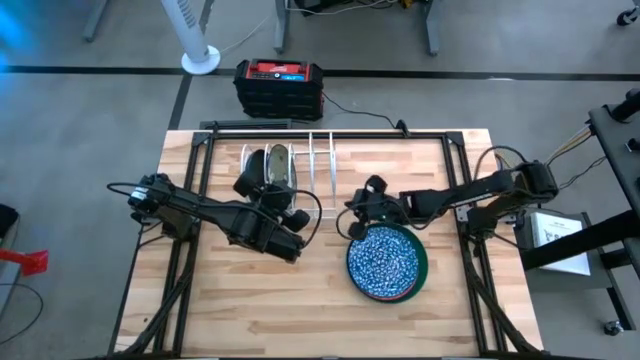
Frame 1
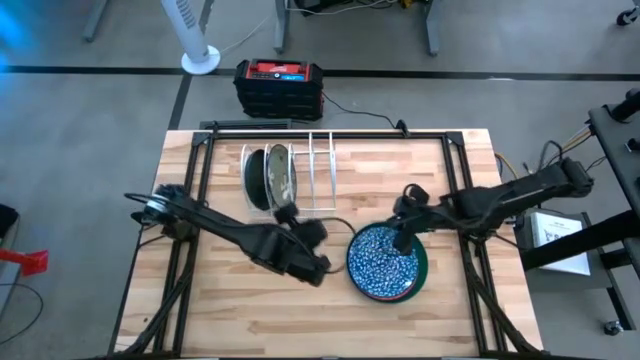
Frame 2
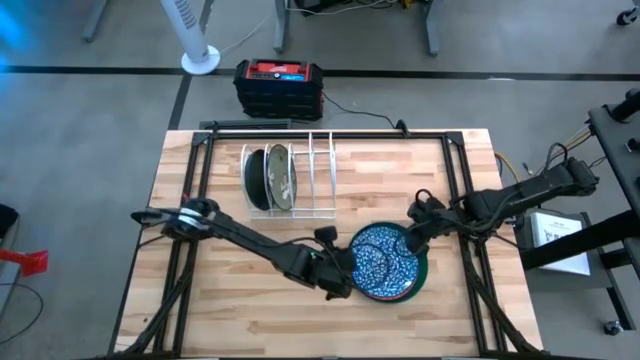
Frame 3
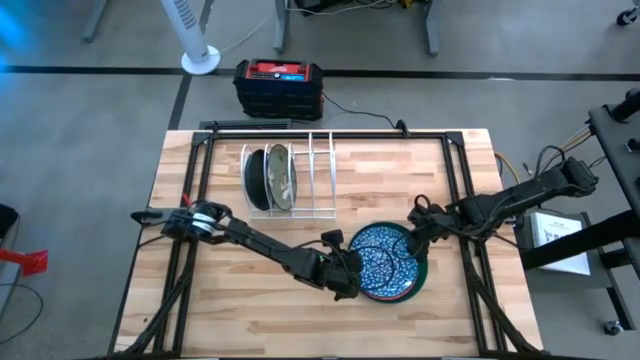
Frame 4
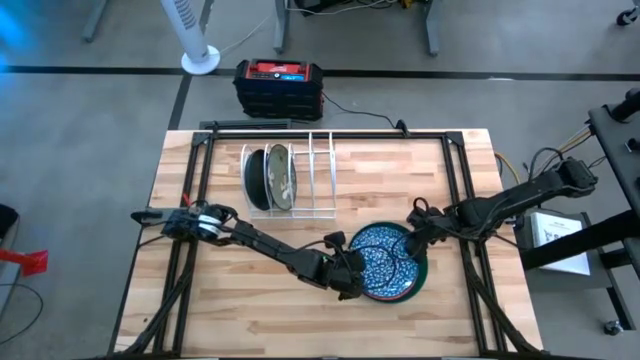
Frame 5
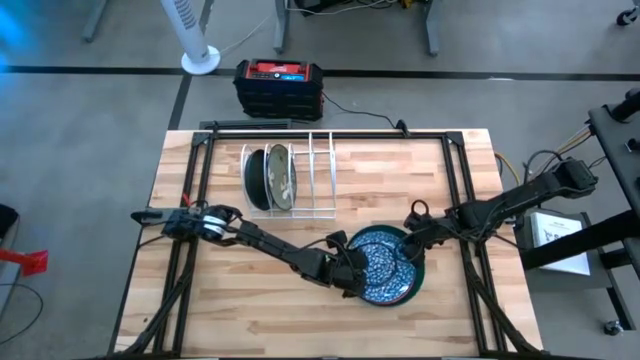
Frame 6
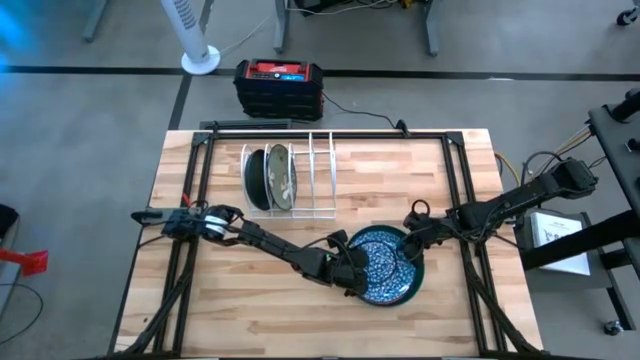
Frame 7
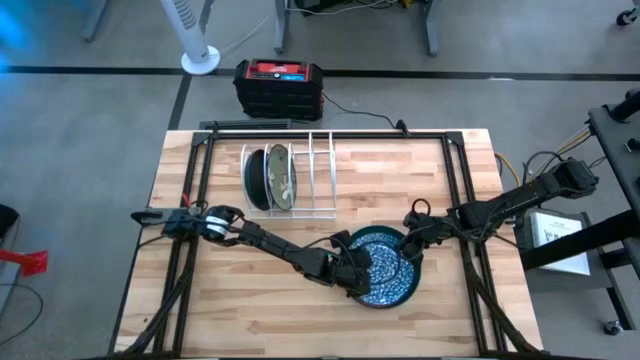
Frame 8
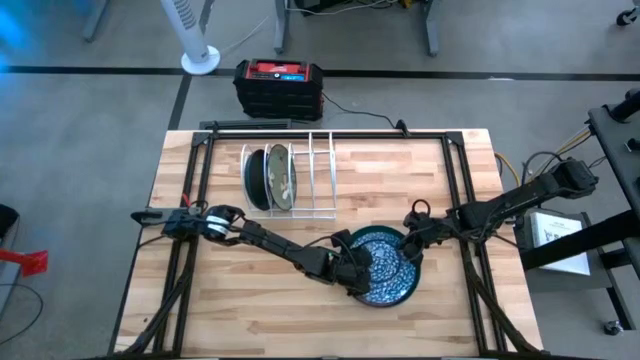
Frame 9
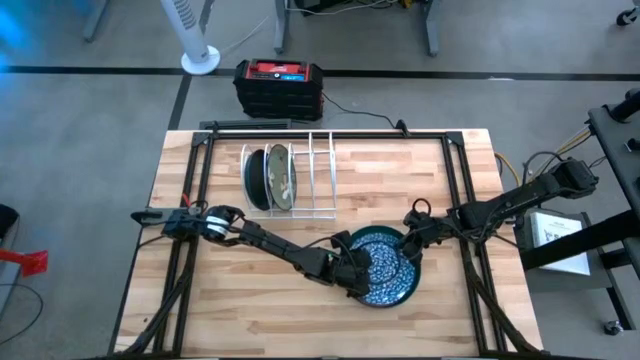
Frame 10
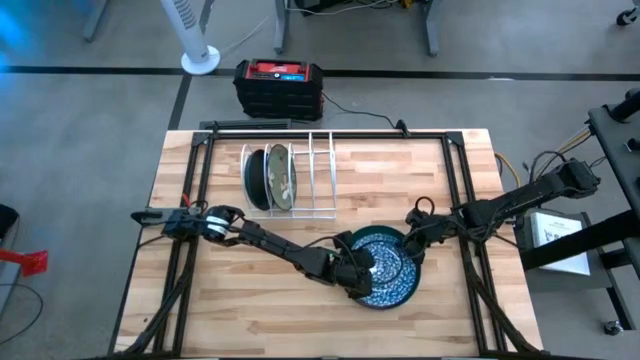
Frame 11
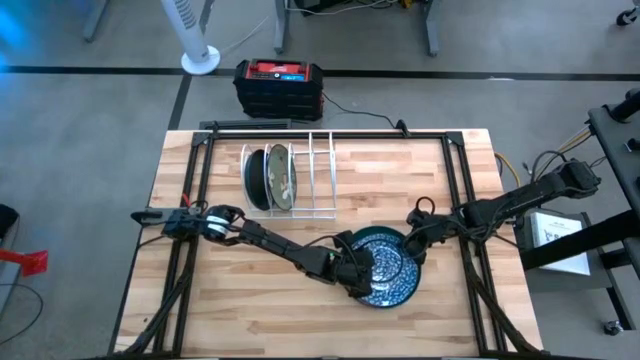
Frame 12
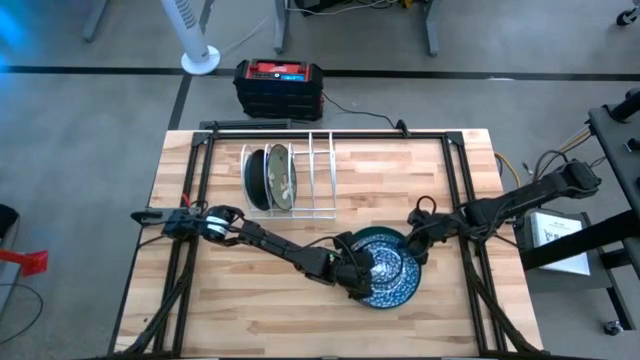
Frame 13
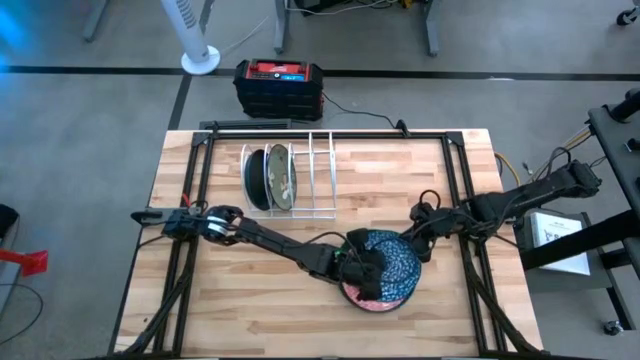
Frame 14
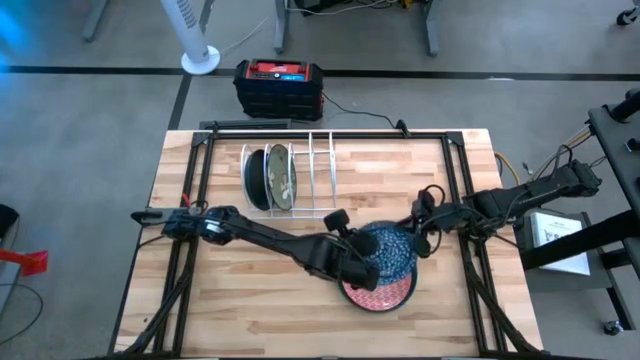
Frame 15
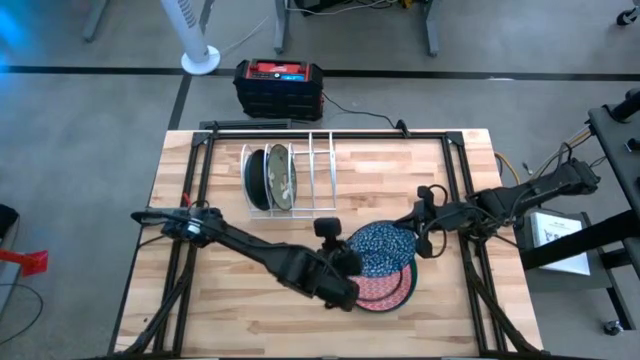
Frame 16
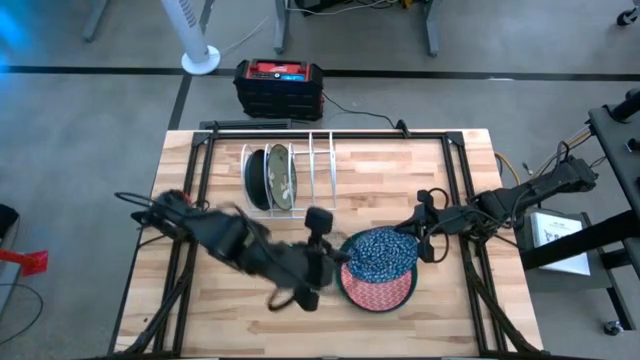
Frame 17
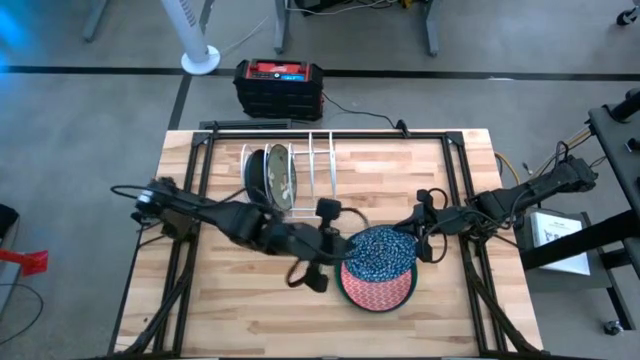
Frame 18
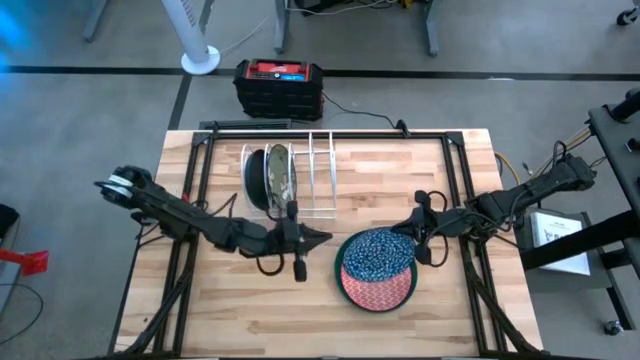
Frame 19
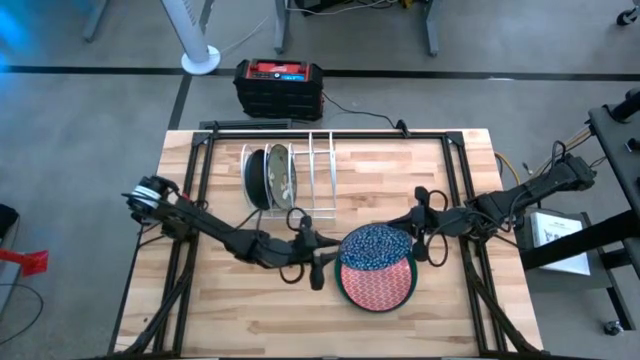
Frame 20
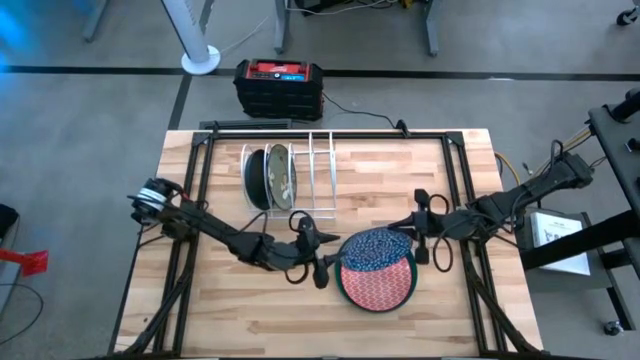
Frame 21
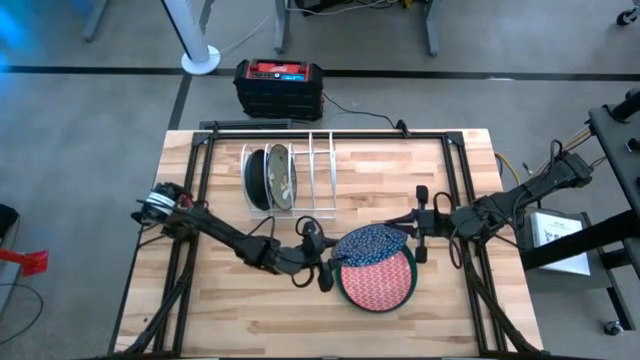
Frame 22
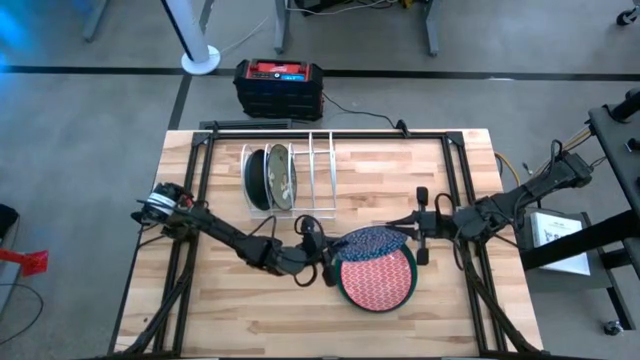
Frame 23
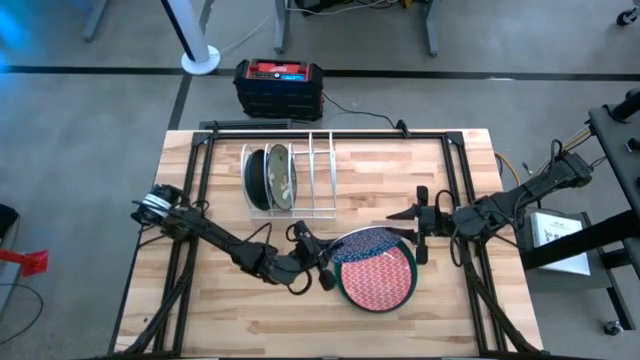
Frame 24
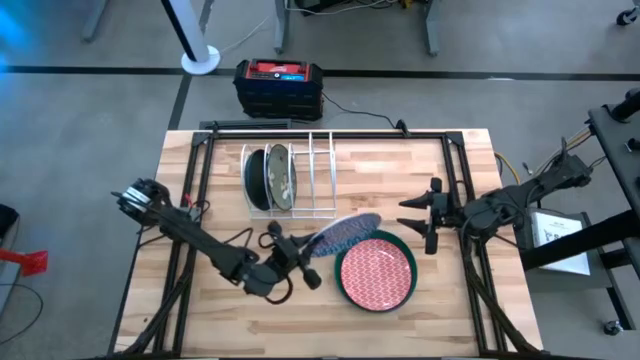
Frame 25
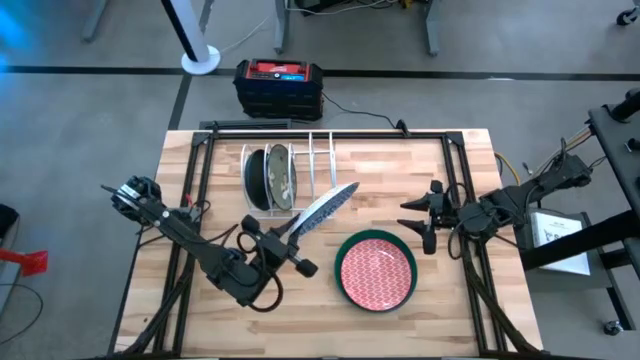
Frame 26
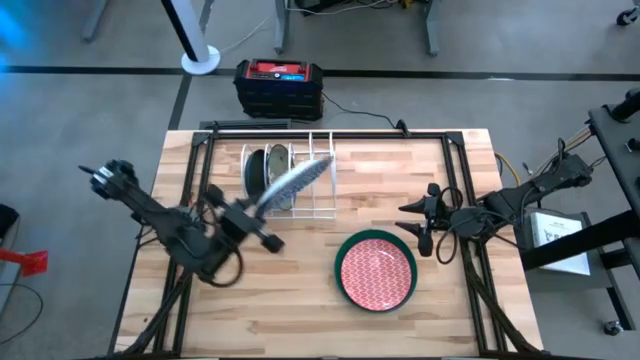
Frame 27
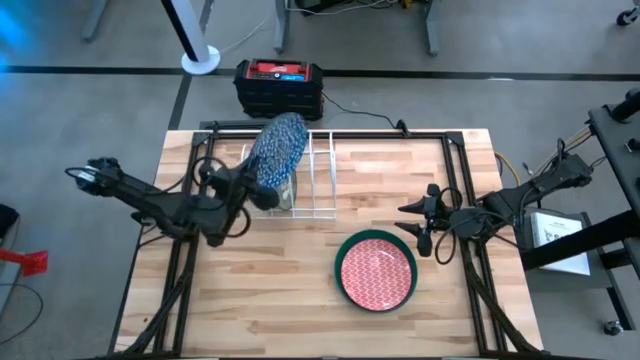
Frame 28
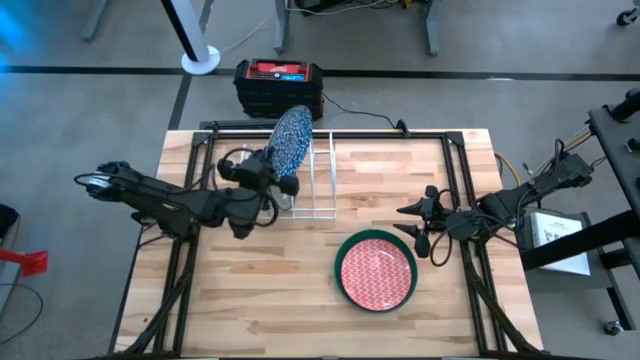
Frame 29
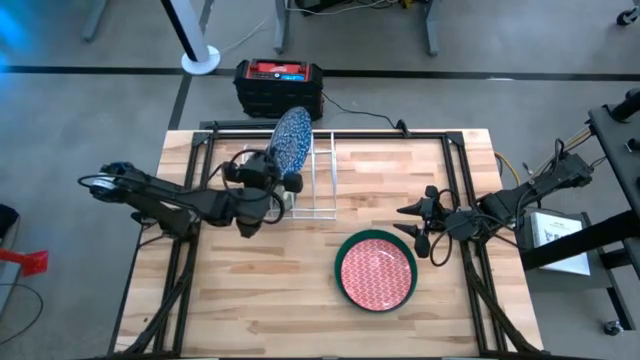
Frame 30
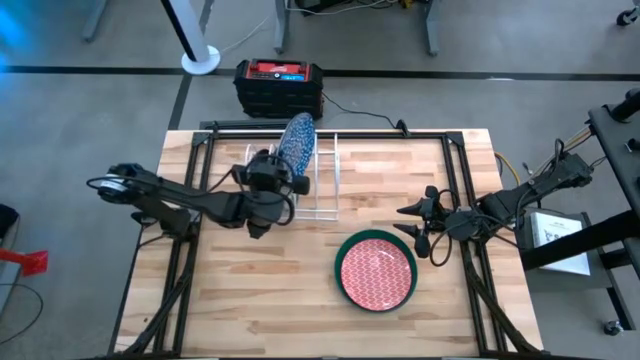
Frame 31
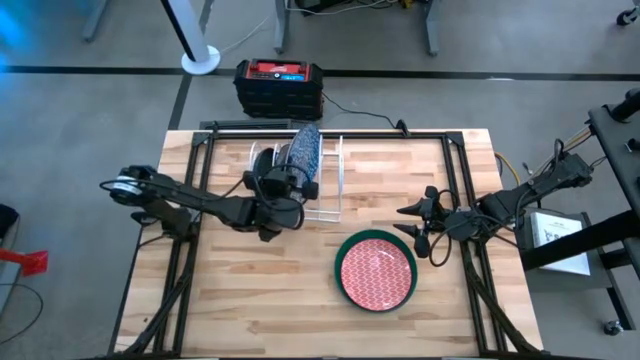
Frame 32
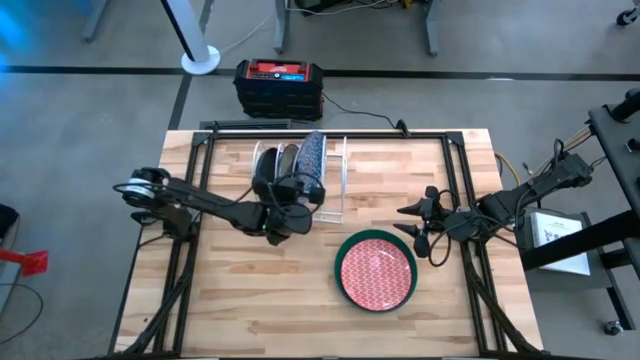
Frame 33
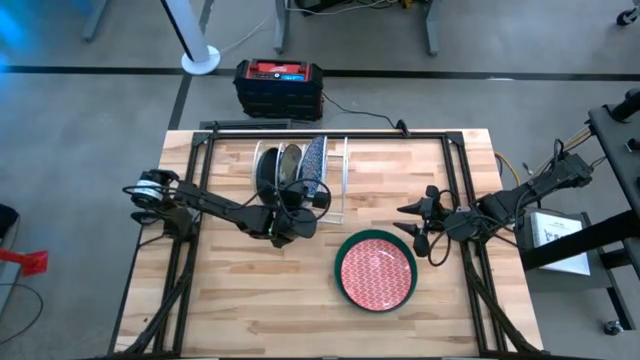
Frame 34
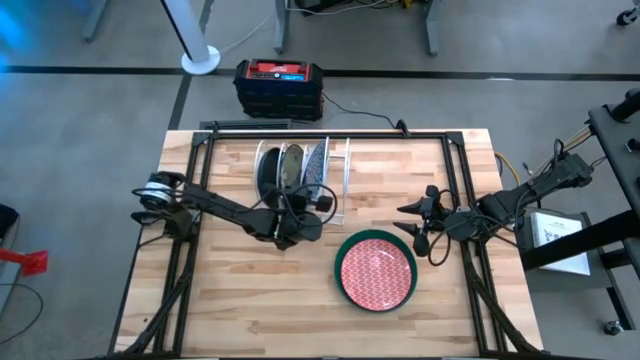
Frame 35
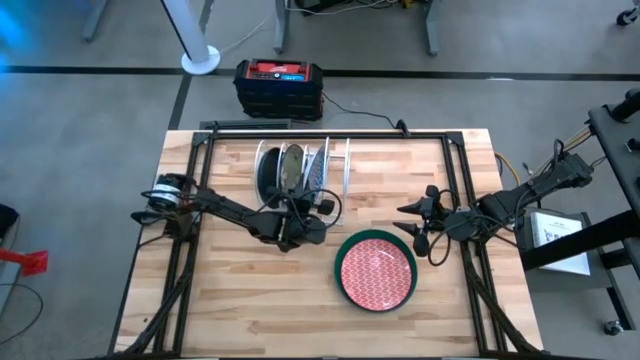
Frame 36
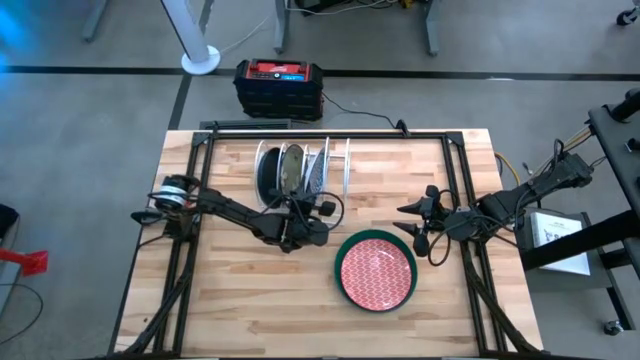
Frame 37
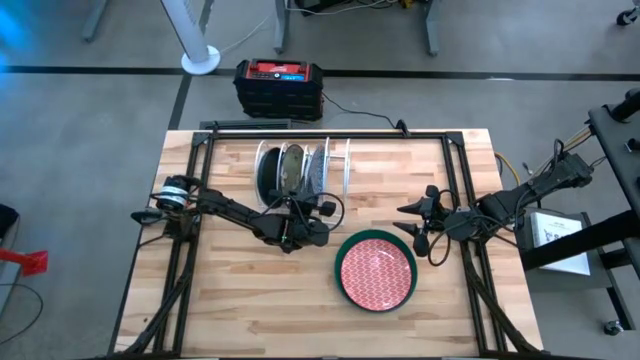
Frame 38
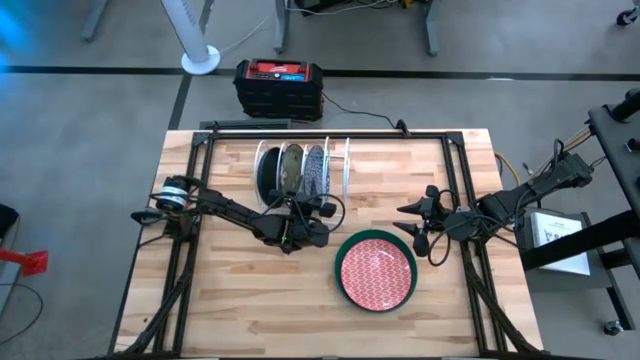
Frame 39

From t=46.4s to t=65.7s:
Task: Sort dishes
Put the blue pattern plate into the white dish rack

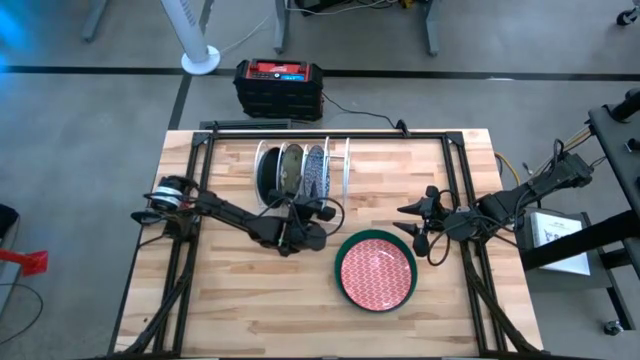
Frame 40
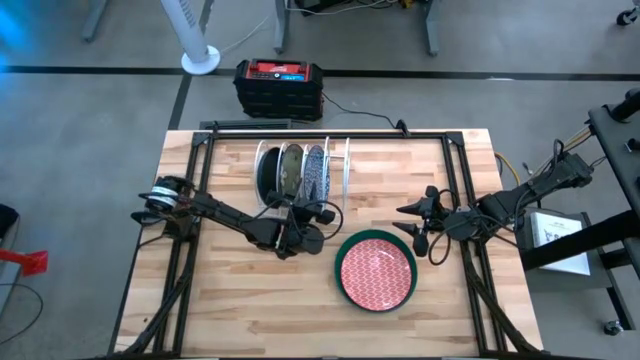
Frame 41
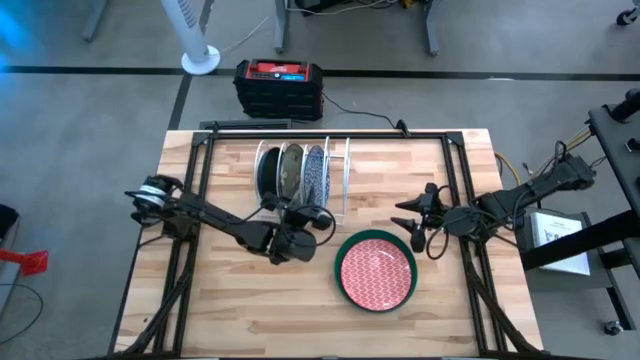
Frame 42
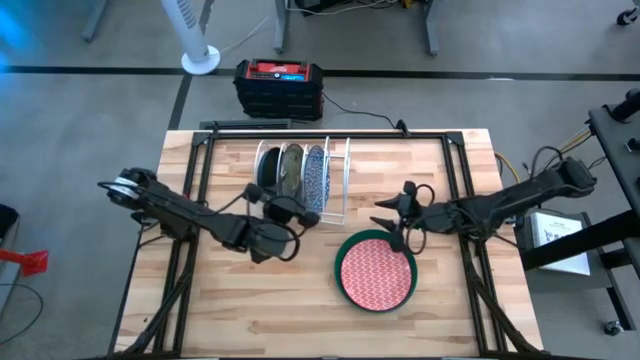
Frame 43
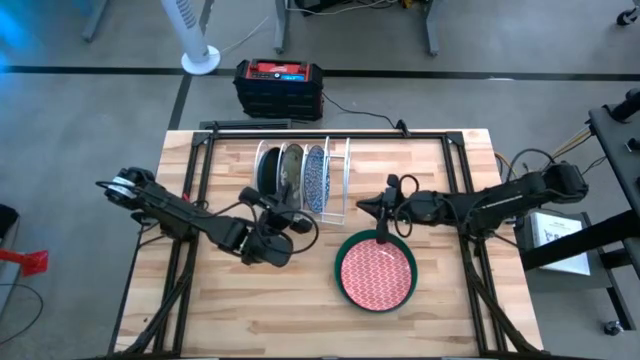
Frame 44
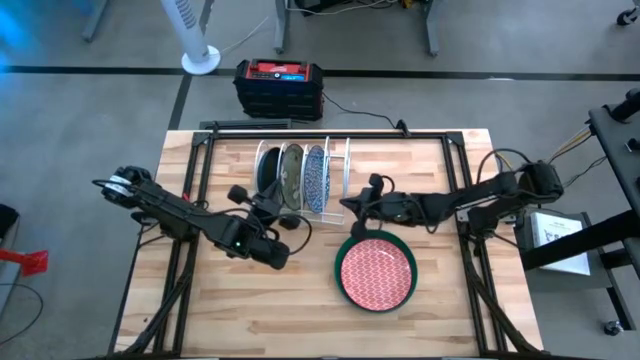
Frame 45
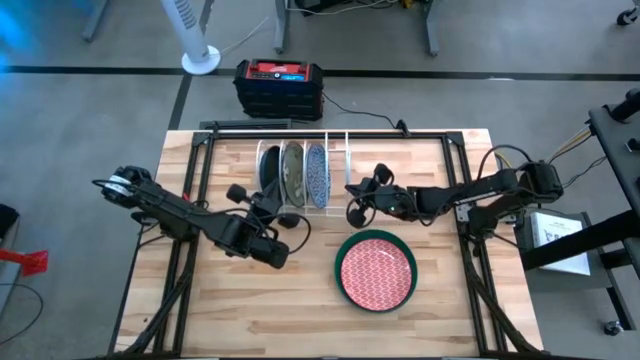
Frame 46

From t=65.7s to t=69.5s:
Adjust the white dish rack
